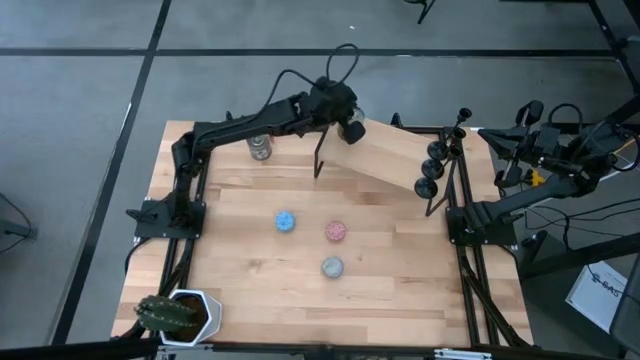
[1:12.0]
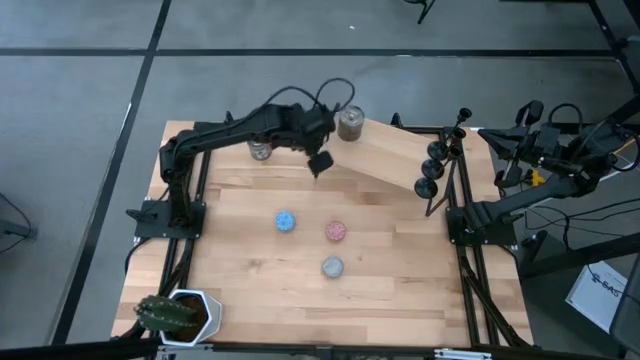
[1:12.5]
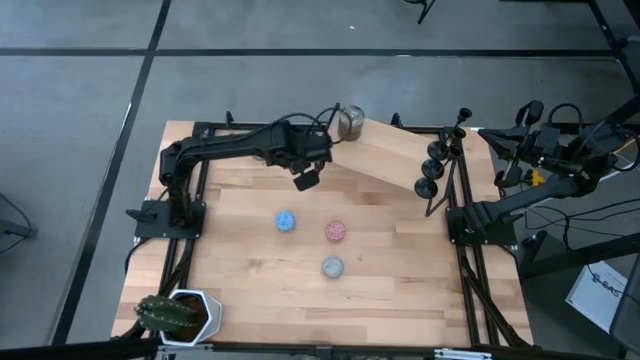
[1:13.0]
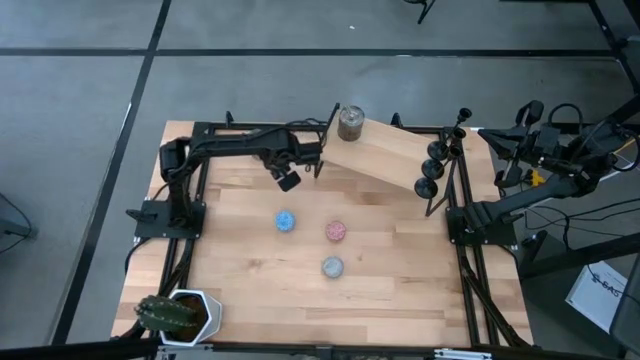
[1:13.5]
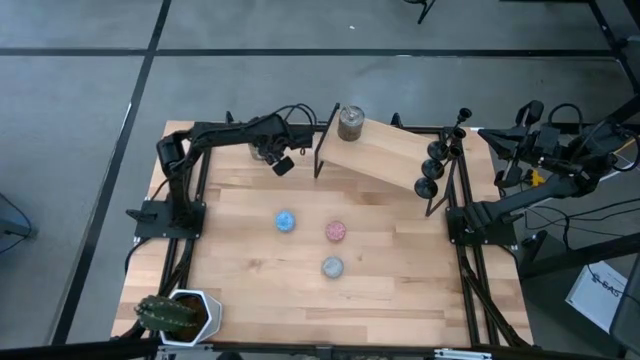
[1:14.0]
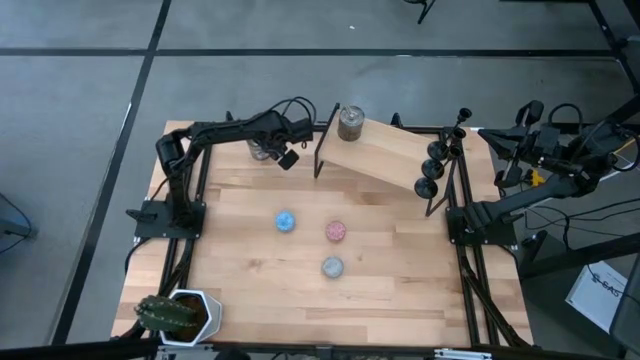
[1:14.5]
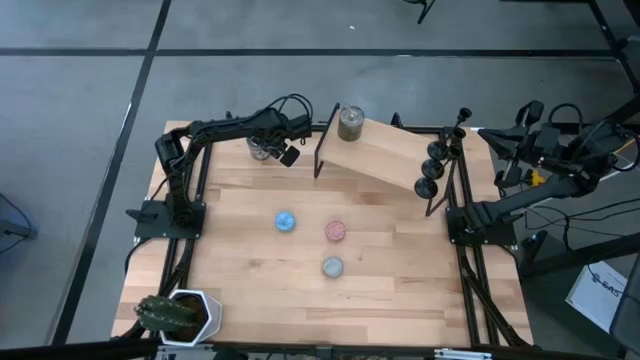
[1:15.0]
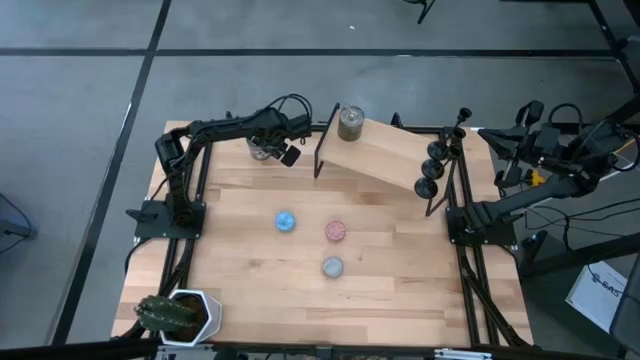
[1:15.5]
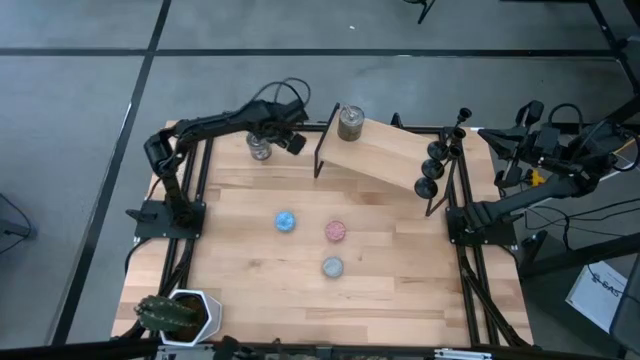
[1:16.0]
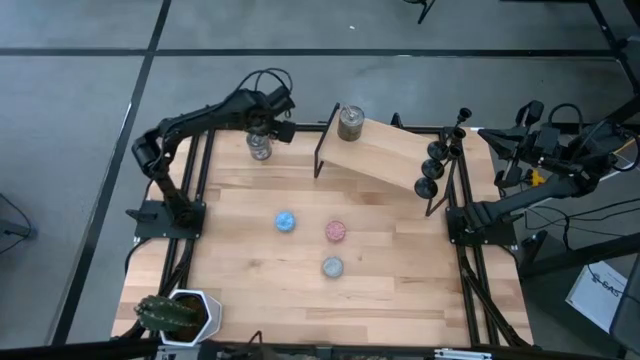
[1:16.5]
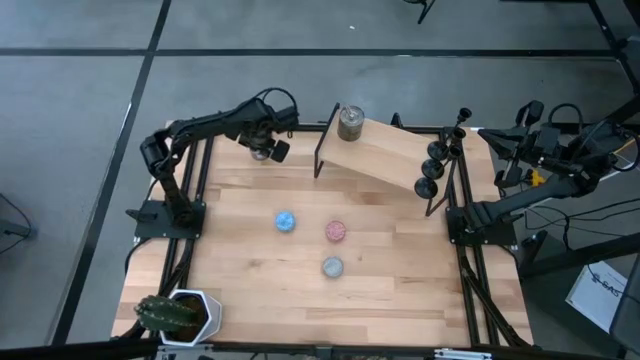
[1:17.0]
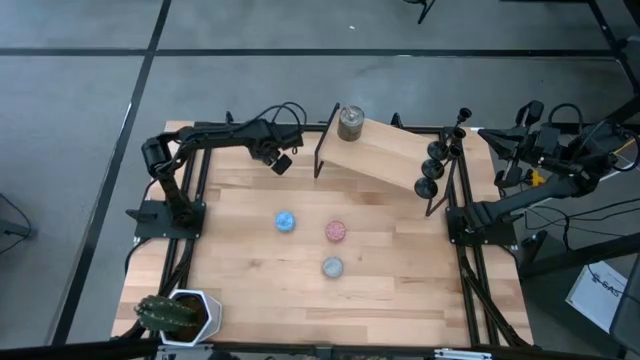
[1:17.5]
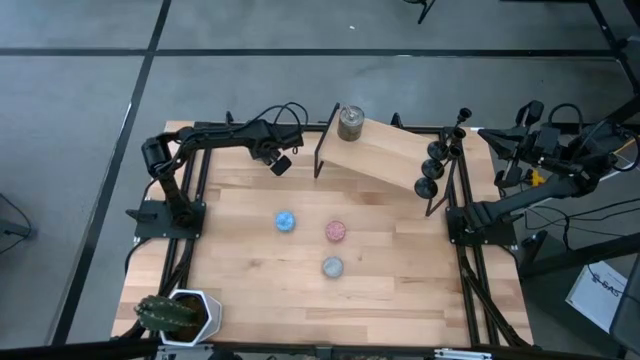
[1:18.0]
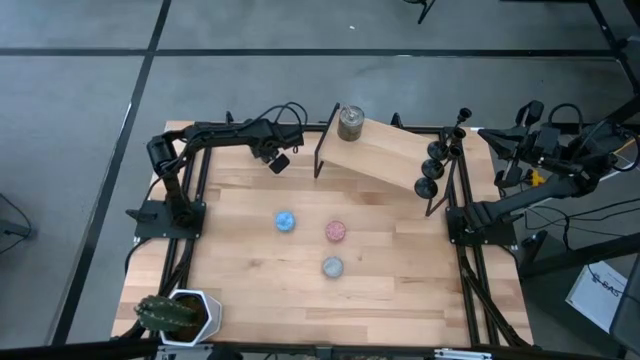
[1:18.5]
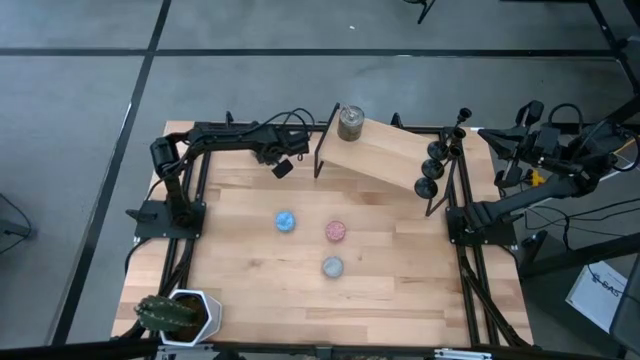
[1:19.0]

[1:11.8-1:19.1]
Task: Pick & Place candle stick holders
Align the silver scented candle with the other silver scented candle on the shelf

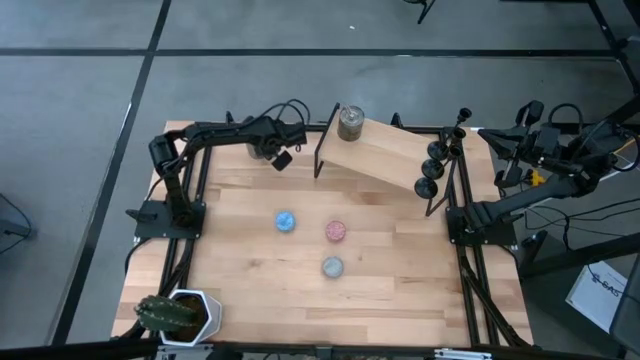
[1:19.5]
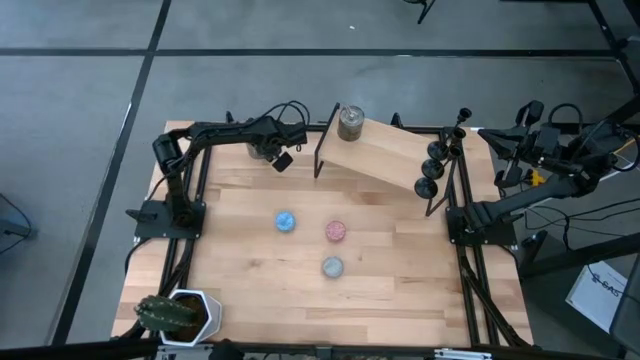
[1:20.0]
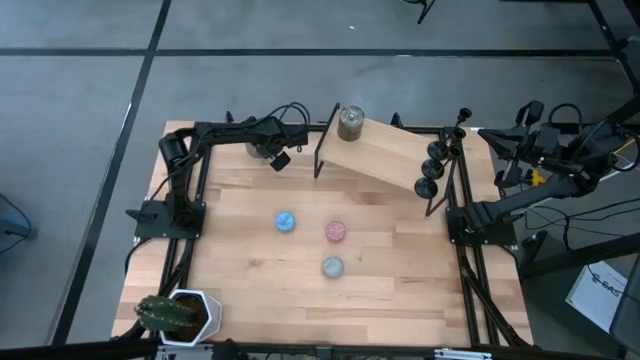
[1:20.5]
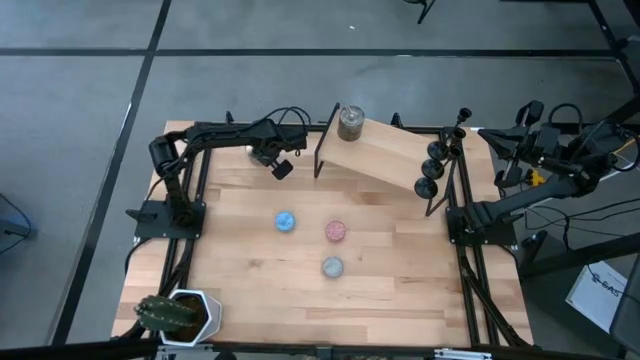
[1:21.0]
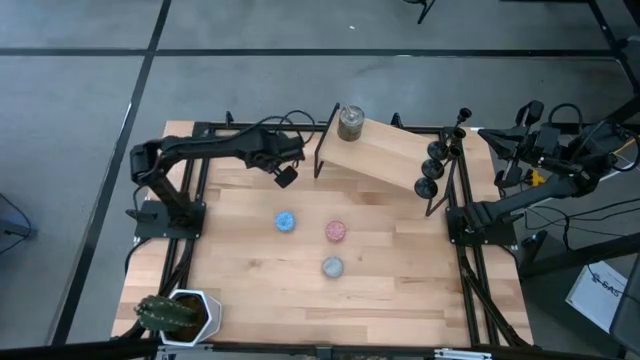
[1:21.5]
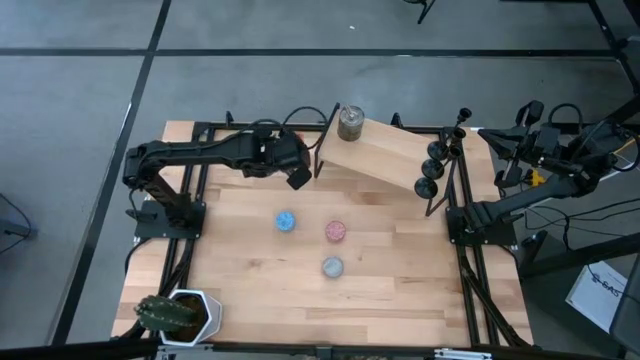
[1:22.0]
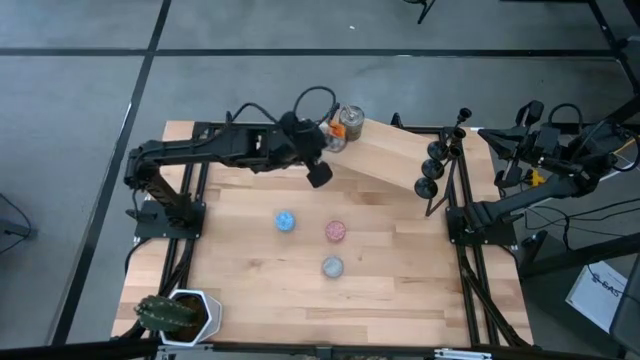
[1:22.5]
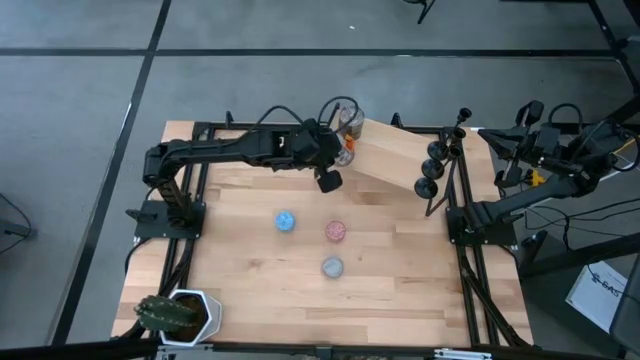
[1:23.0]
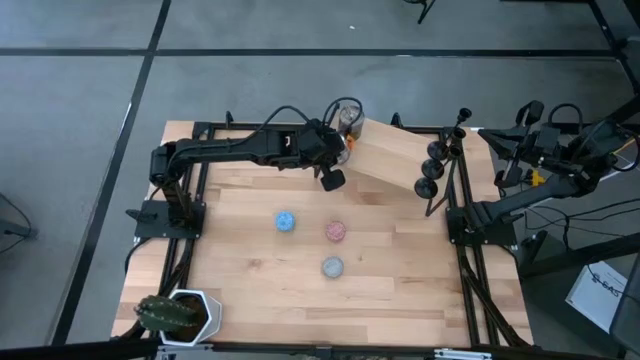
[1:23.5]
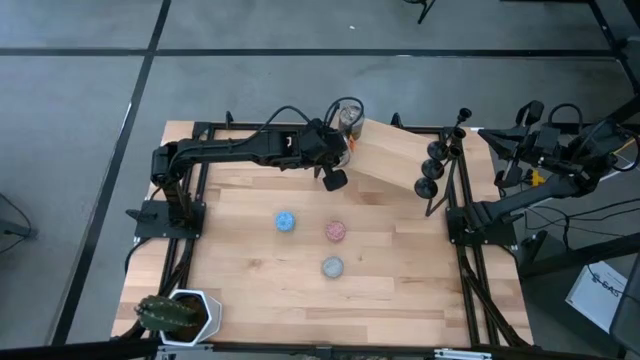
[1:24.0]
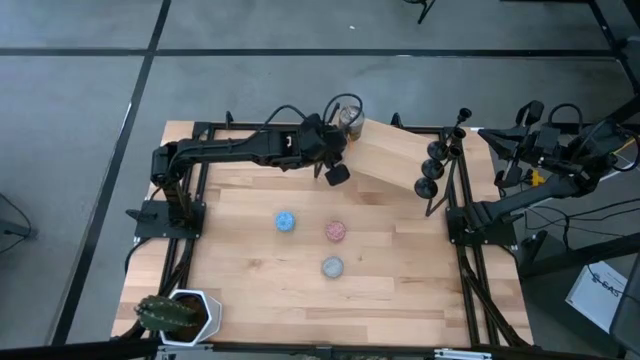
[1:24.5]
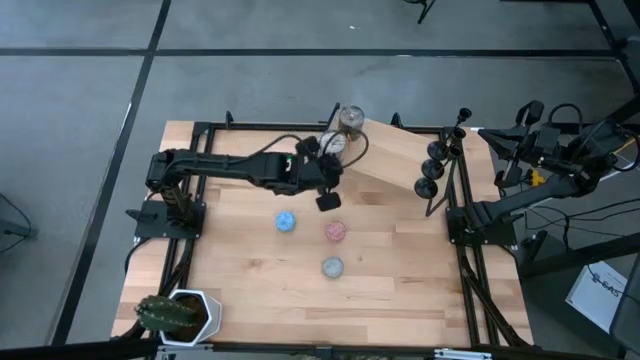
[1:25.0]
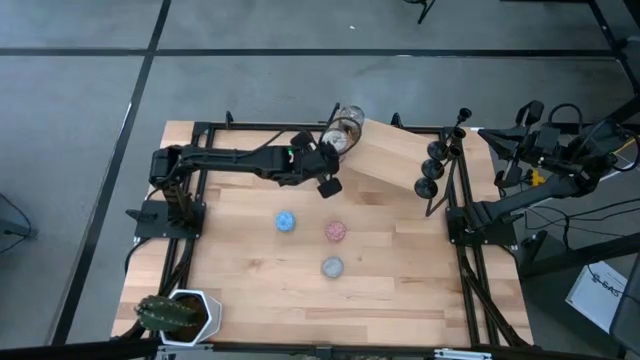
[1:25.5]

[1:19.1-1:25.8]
Align the silver scented candle with the other silver scented candle on the shelf

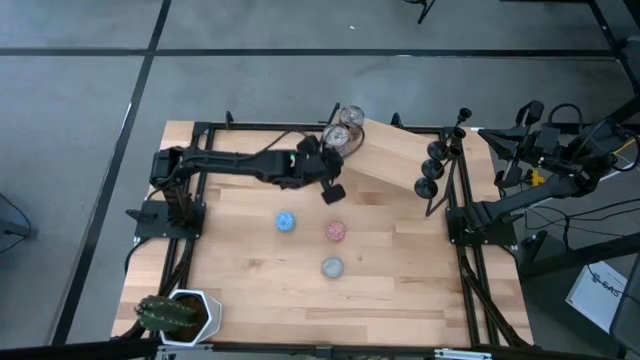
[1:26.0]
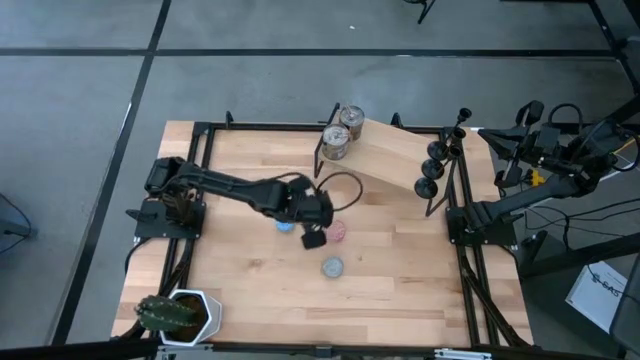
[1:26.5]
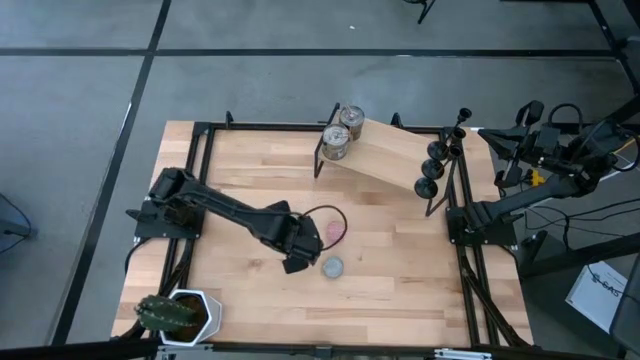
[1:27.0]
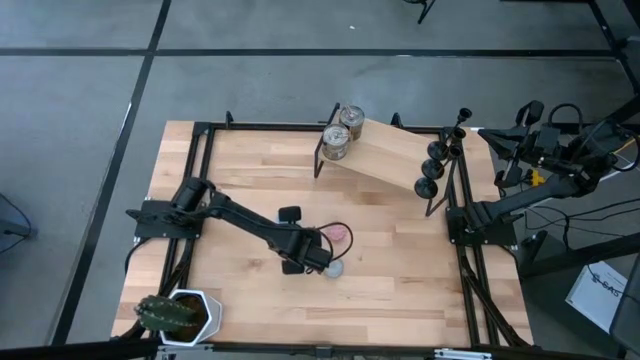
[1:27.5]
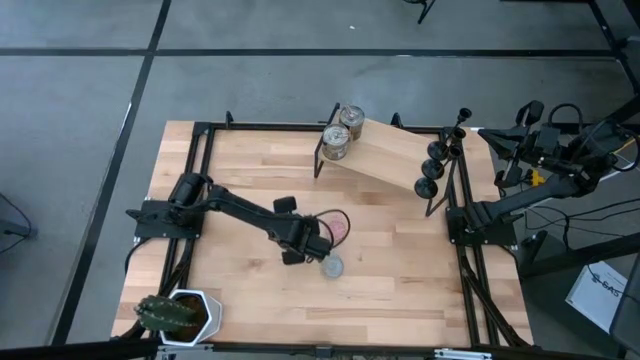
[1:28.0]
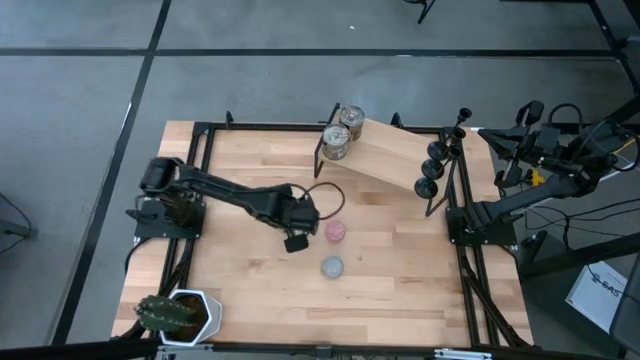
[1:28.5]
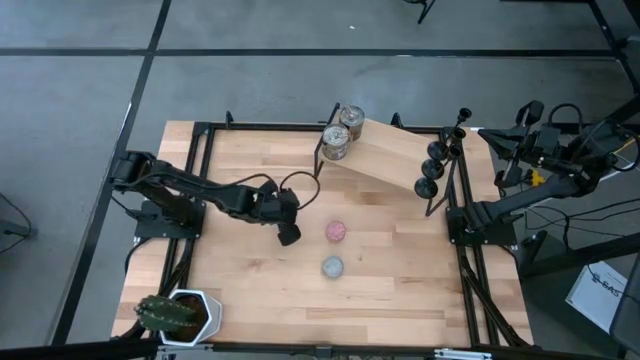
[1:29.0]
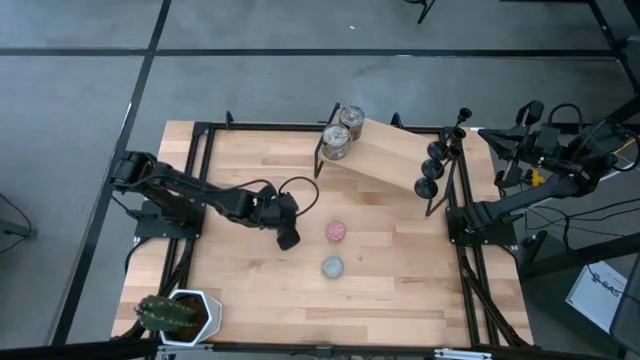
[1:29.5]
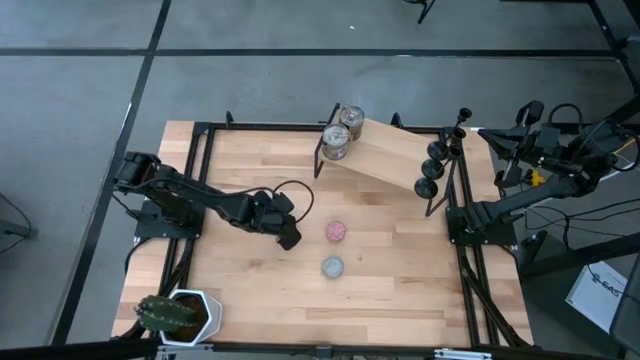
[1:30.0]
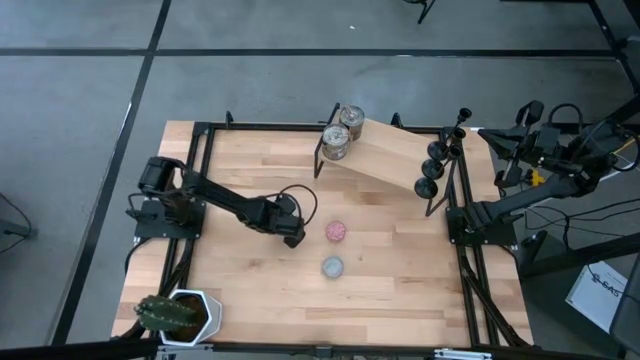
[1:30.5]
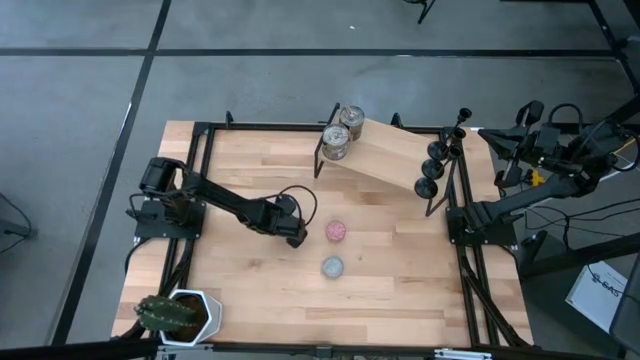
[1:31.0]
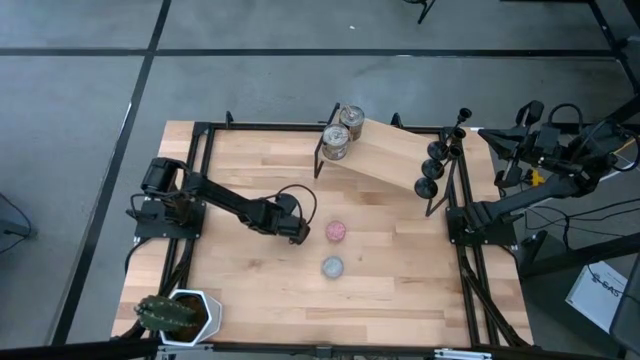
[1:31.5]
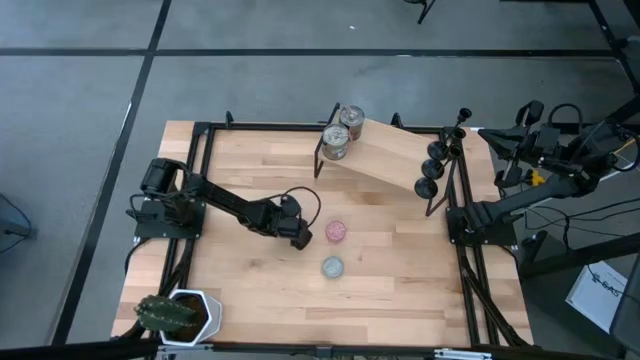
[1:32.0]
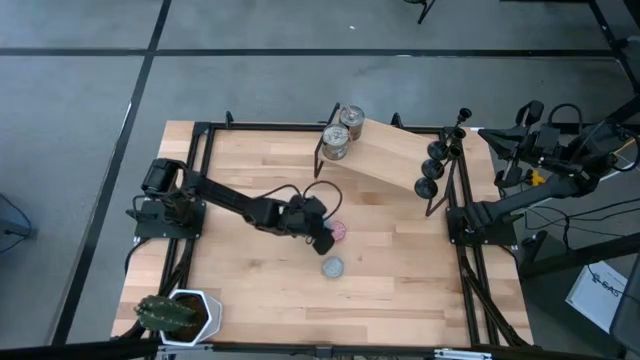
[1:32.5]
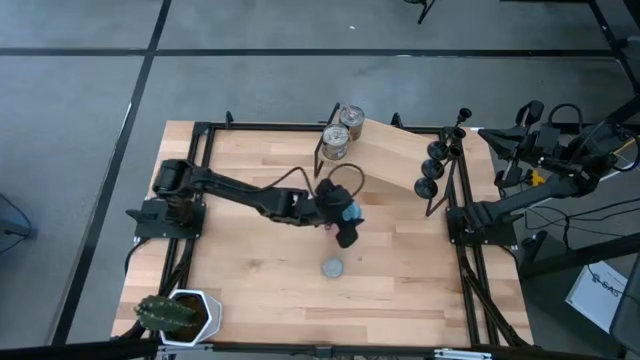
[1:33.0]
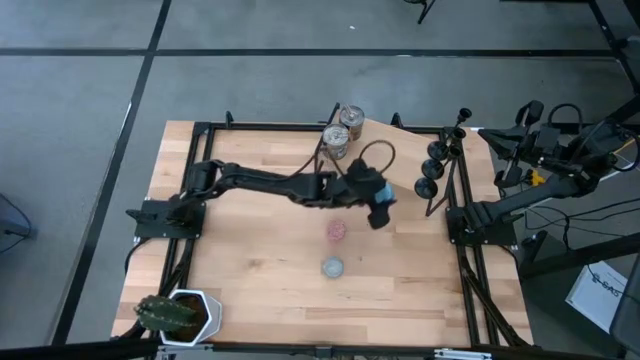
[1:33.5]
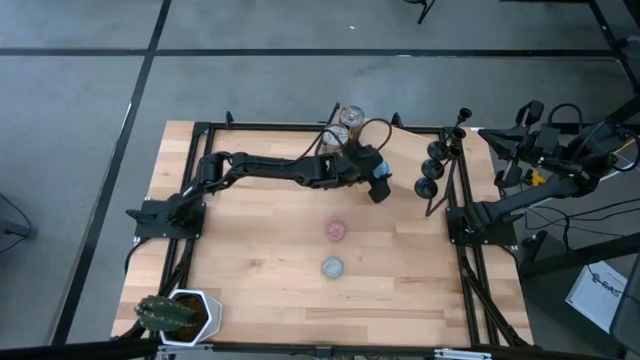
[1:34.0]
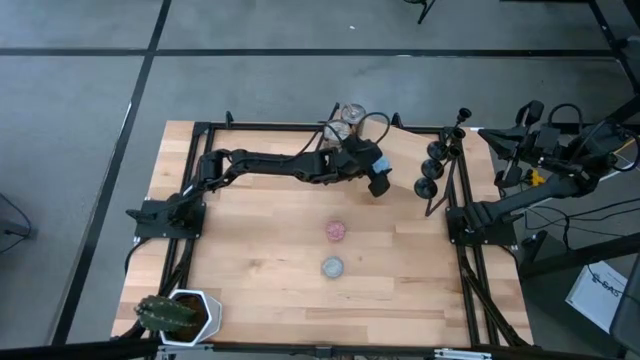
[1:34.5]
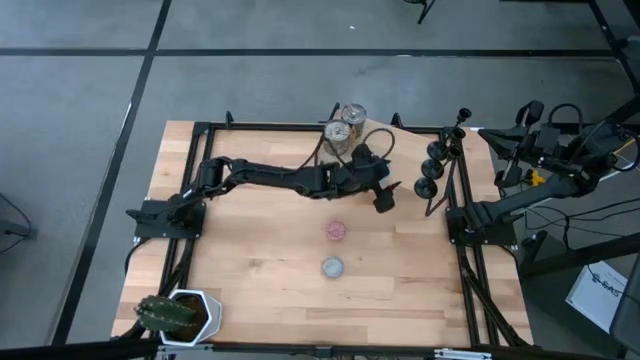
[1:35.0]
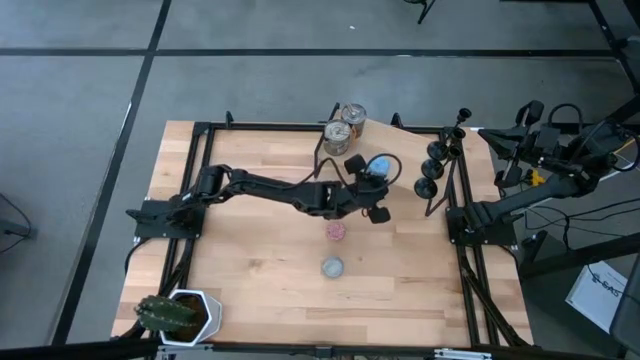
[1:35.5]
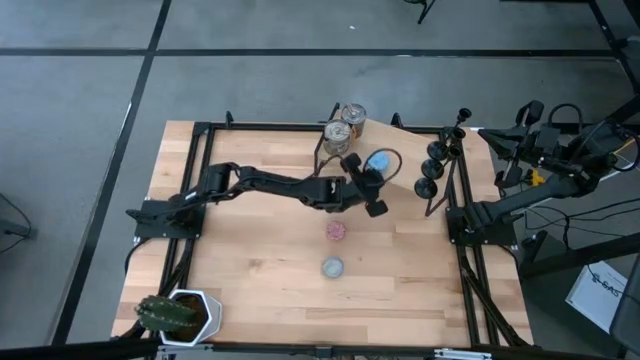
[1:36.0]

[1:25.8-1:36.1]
Put the blue patterned scented candle on the shelf
